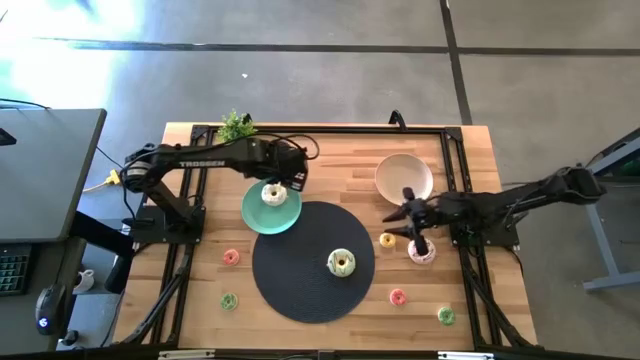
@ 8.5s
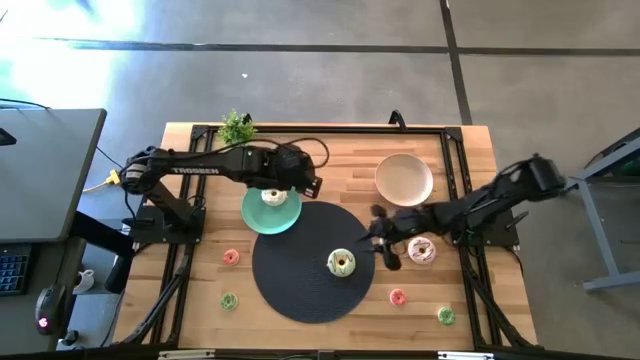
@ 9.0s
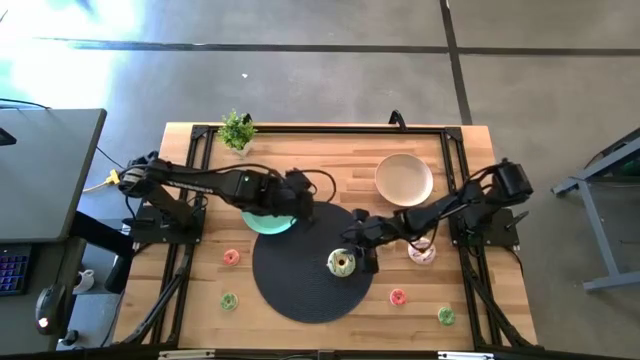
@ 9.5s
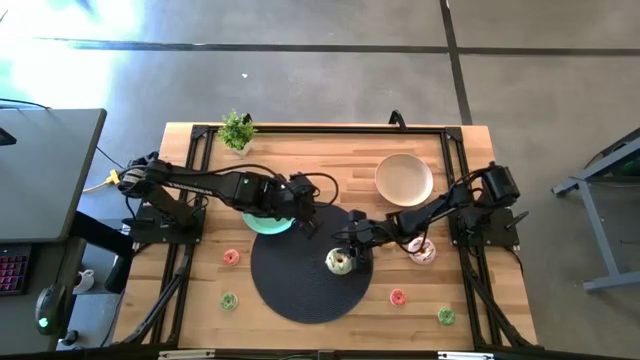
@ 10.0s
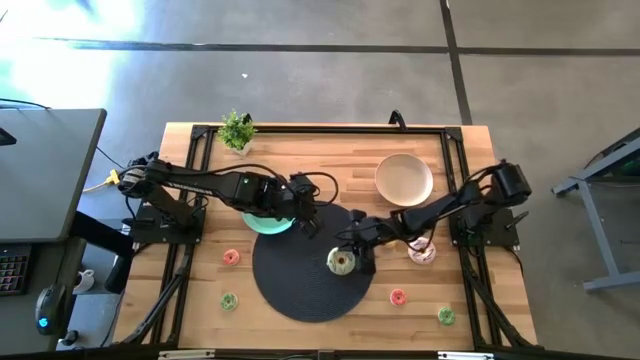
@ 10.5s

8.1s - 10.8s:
Task: Pick & Place donuts
Put the large blue donut on the green plate

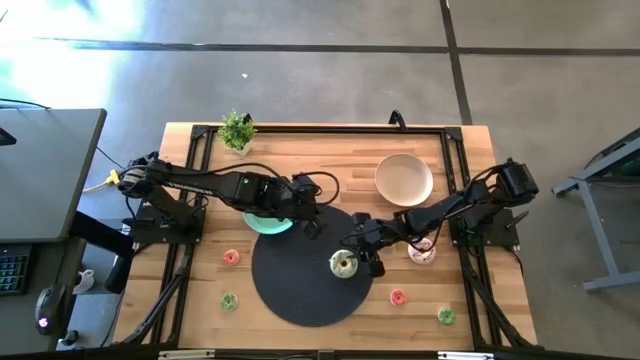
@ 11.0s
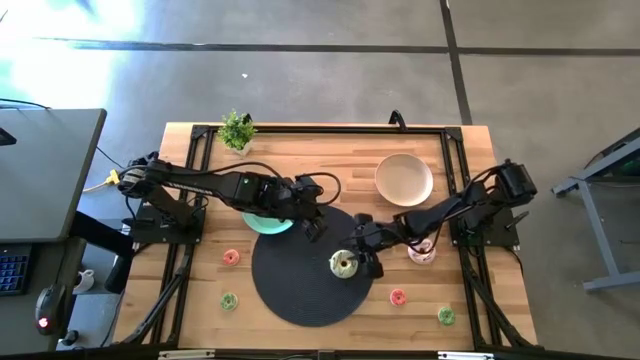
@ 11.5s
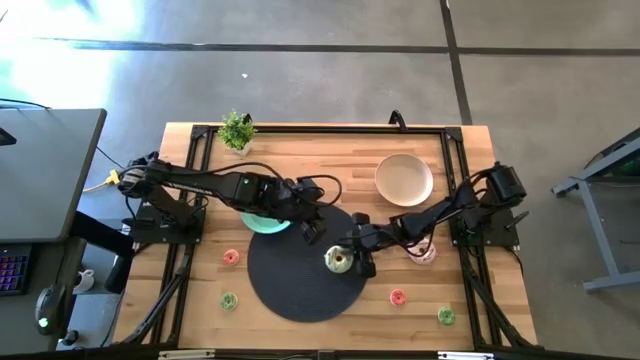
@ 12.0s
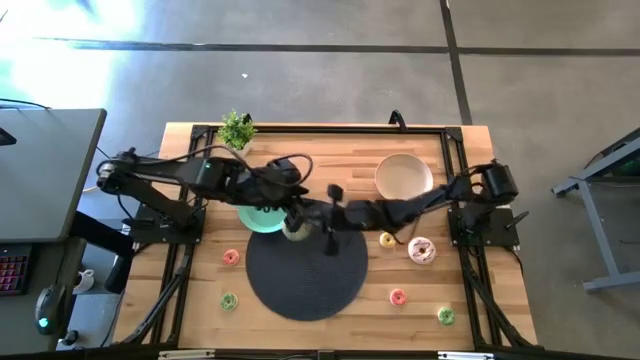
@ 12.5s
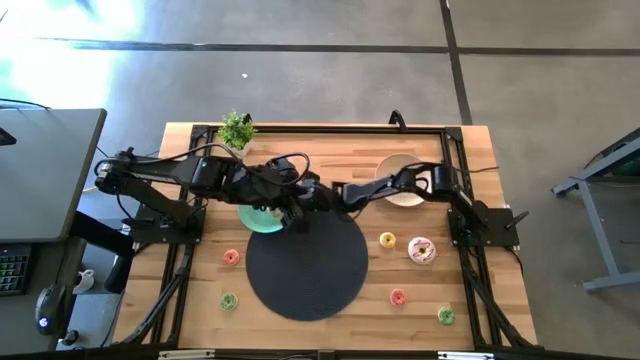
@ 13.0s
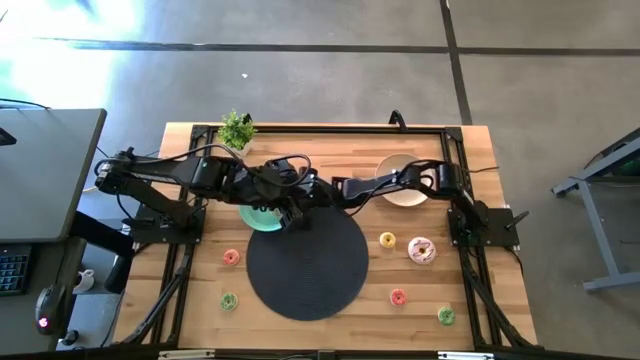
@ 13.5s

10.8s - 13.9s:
Put the large blue donut on the green plate

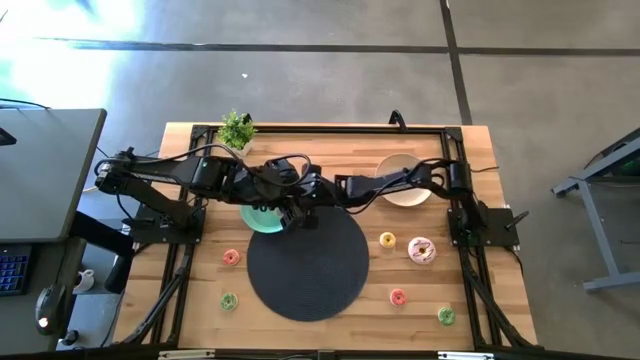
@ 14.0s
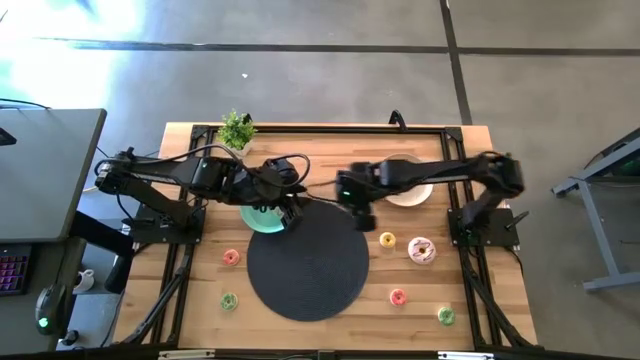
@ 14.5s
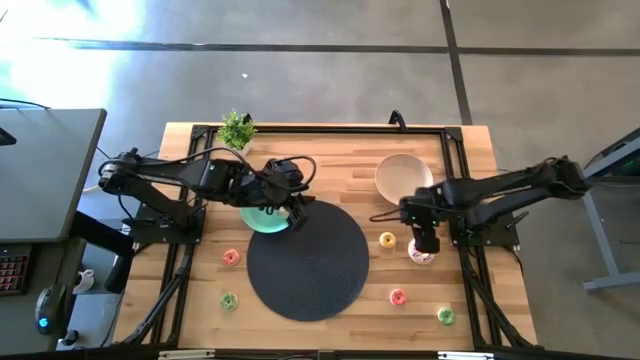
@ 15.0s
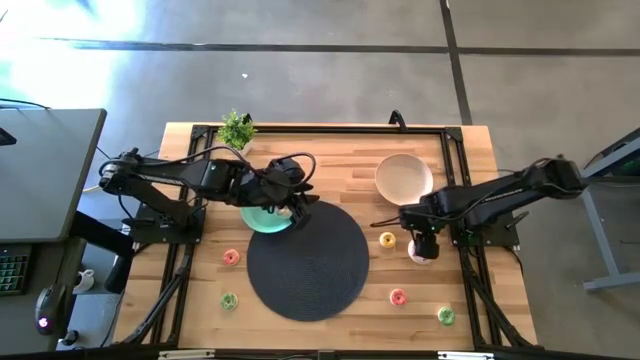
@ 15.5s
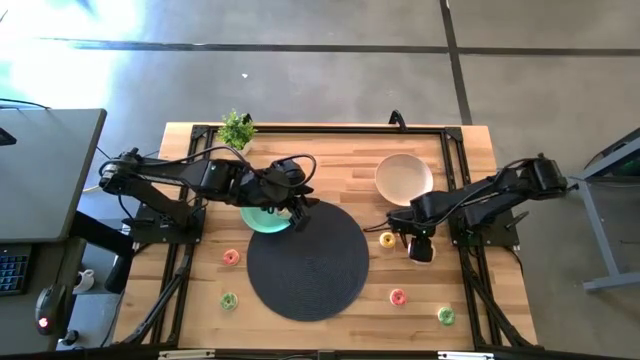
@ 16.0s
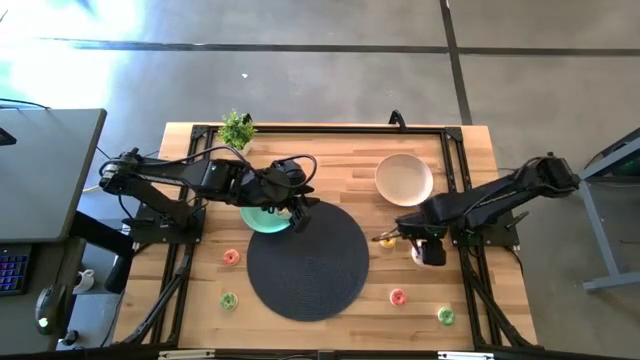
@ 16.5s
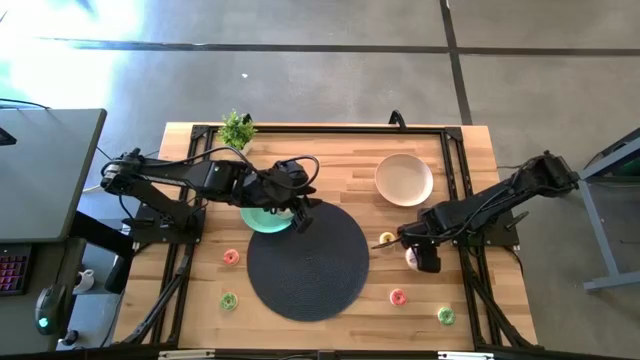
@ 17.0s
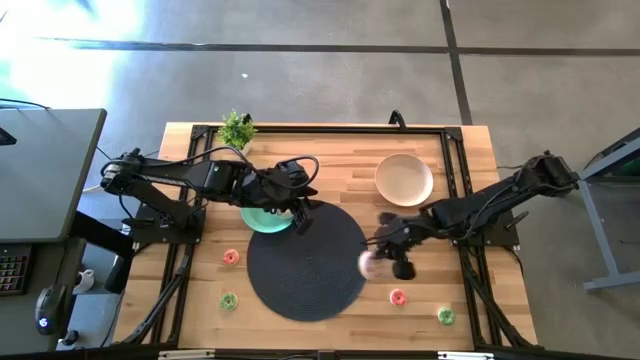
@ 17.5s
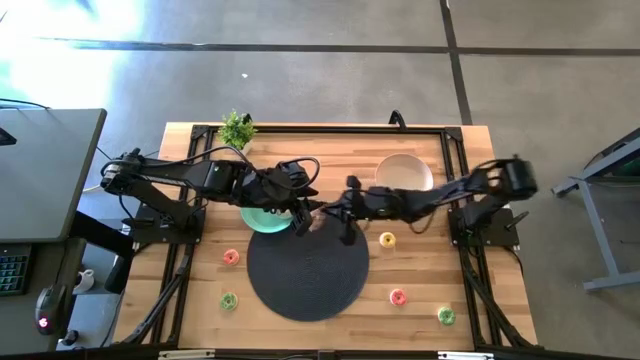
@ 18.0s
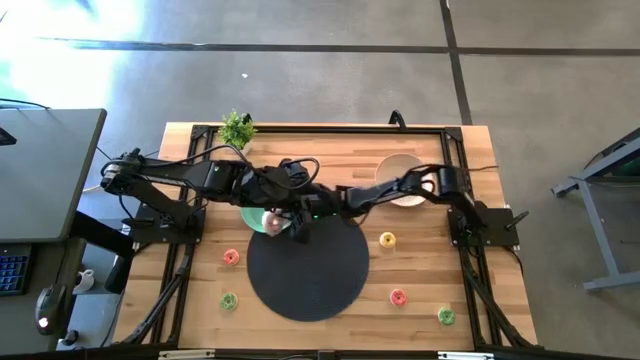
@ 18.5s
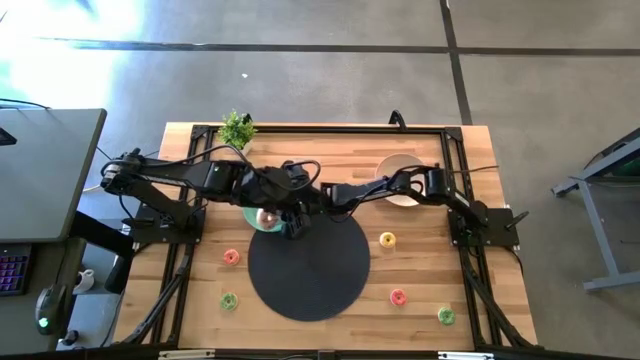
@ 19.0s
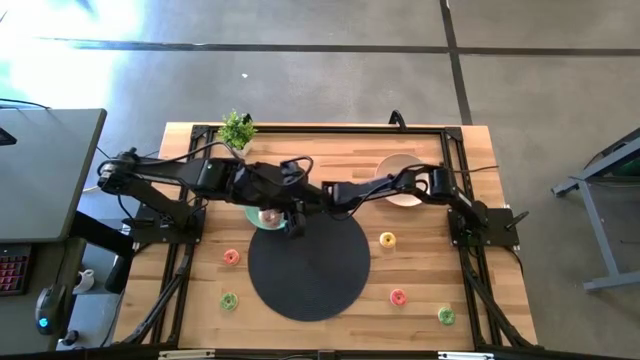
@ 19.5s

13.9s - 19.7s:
Put the large purple donut on the green plate

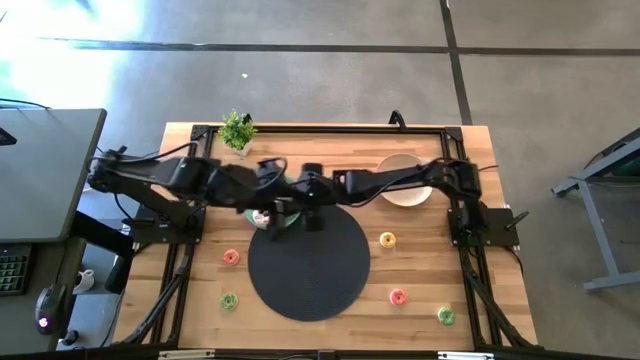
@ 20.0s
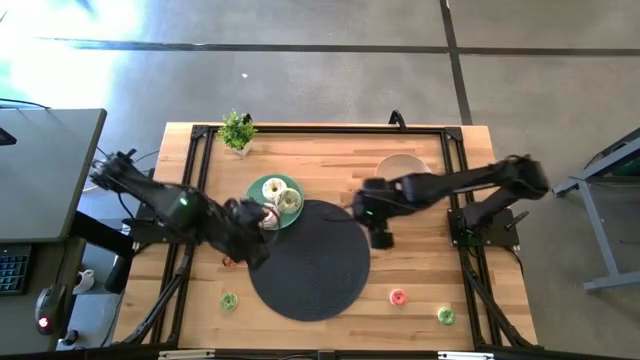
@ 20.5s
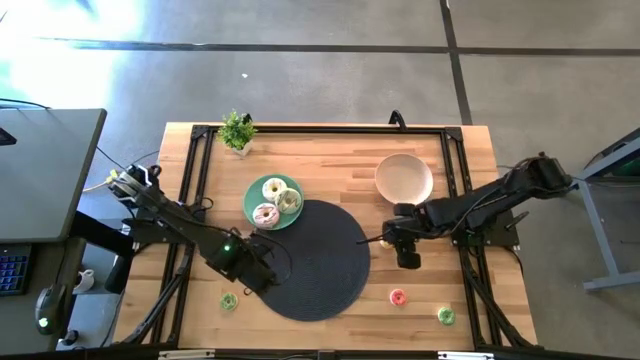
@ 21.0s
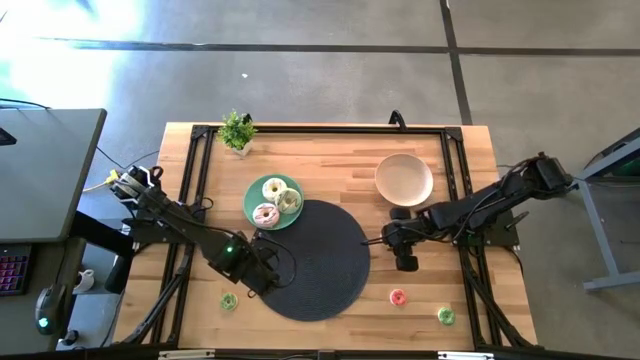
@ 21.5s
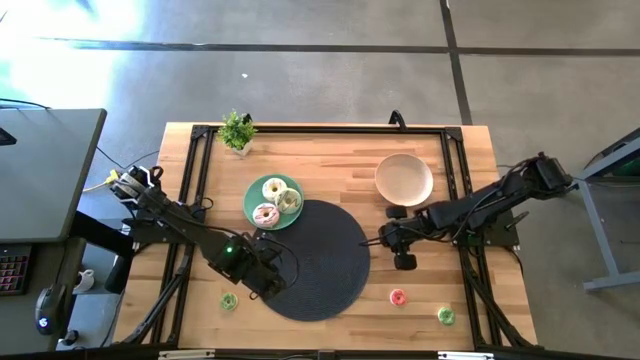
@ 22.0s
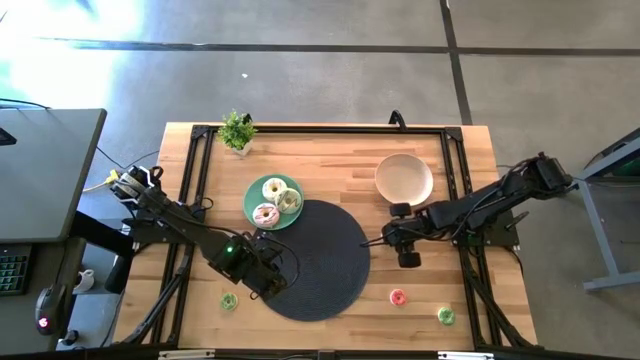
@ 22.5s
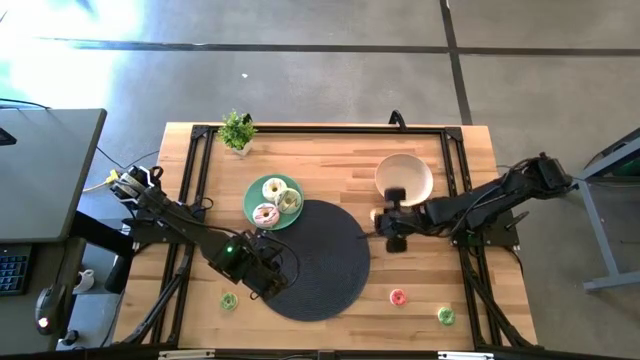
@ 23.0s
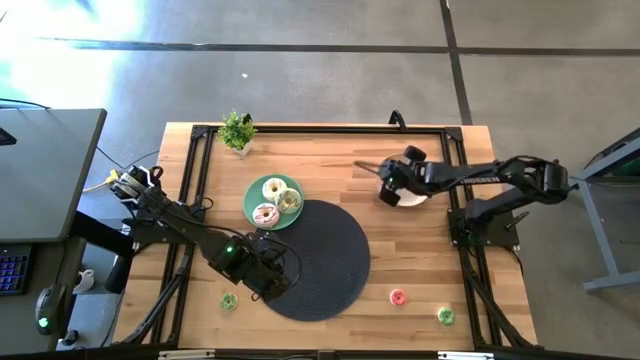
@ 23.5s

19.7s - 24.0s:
Put the small yellow donut on the white plate

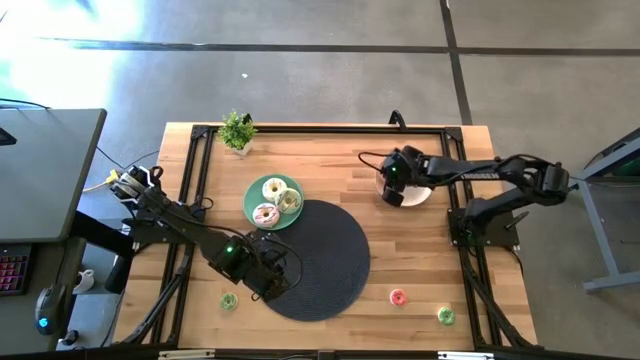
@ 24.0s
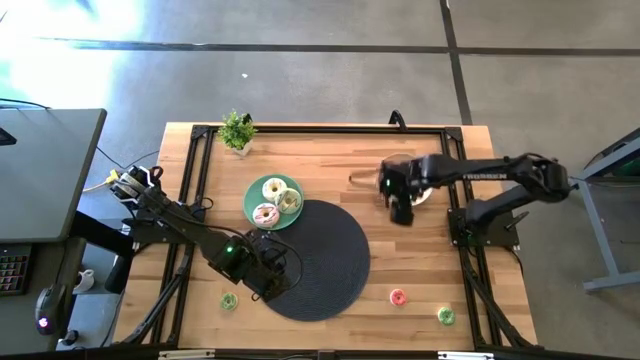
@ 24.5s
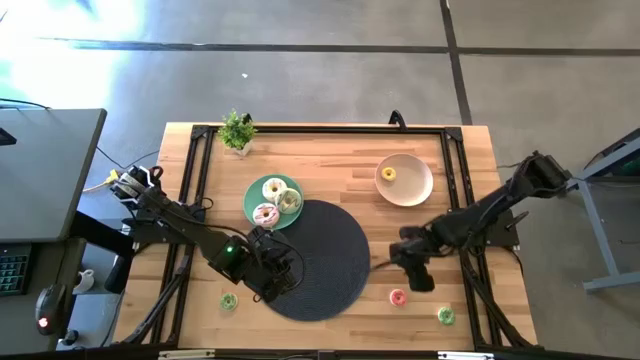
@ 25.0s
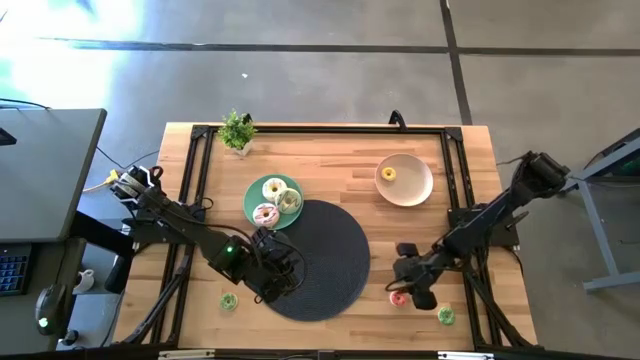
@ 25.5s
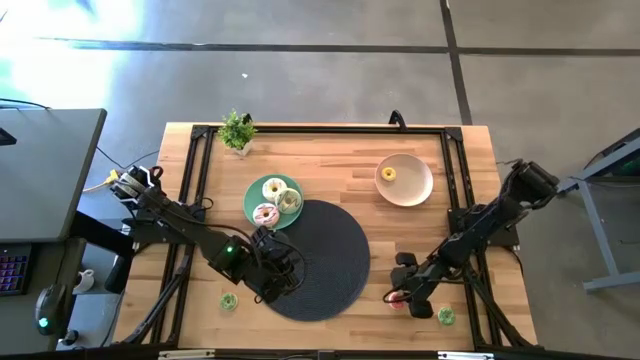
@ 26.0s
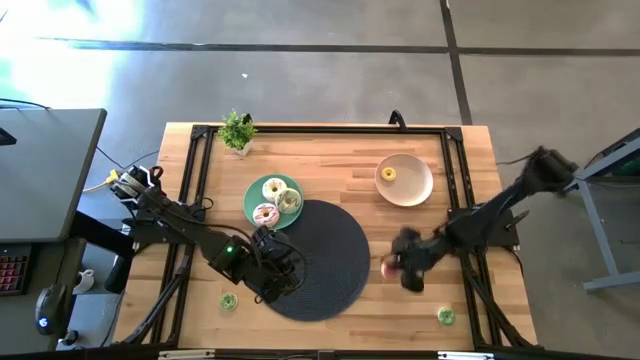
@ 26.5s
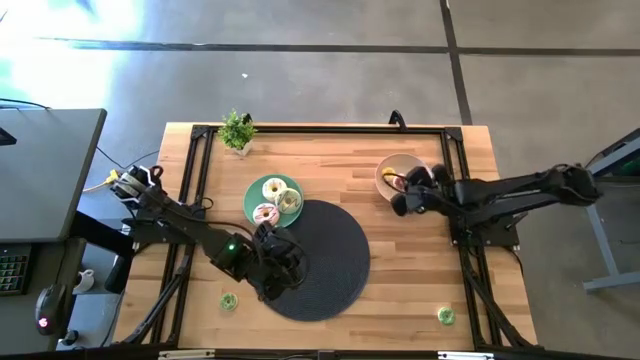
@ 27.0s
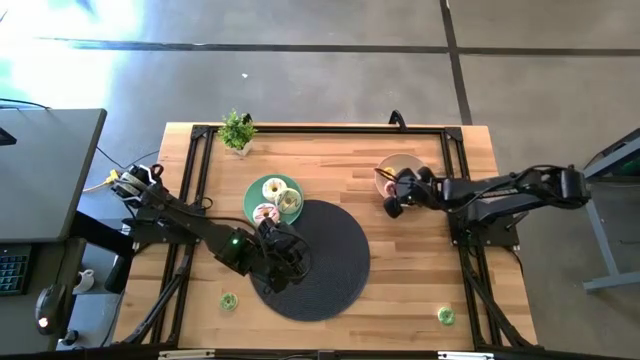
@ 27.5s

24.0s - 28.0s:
Put the bottom small pink donut on the white plate

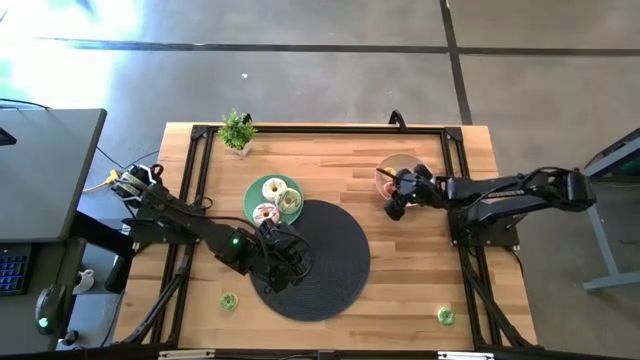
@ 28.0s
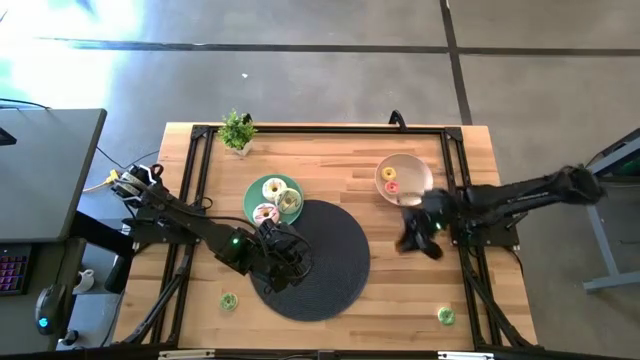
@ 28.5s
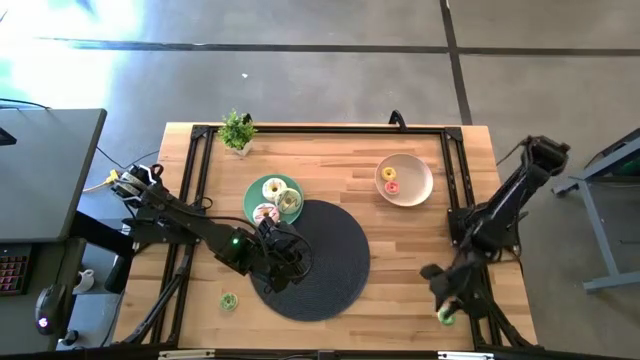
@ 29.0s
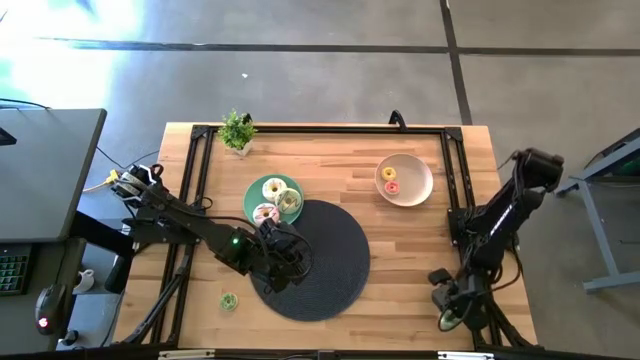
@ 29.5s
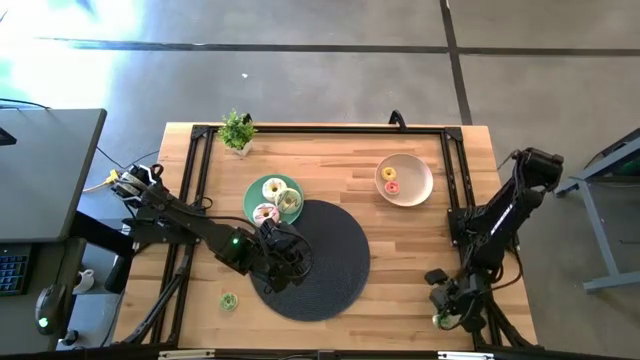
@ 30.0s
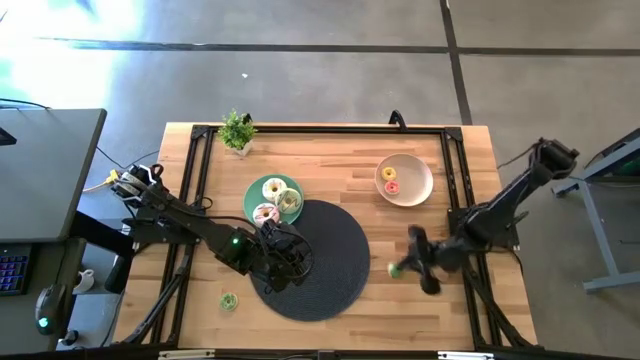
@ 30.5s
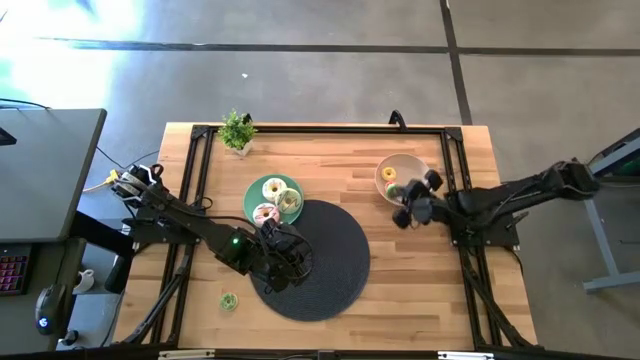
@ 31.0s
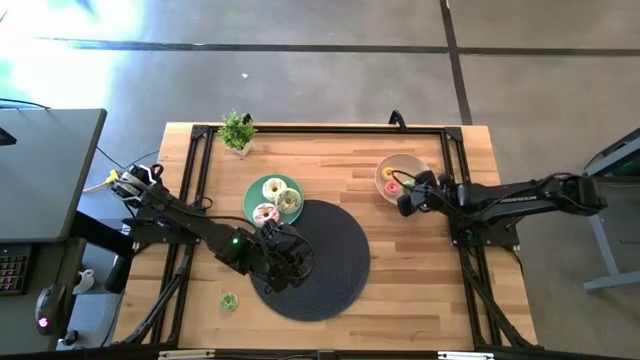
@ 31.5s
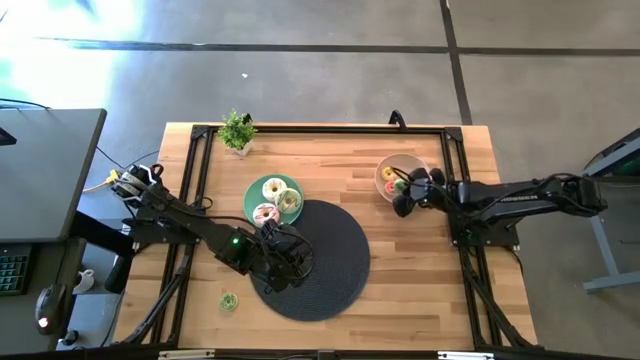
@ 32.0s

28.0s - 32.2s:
Put the right small green donut on the white plate
